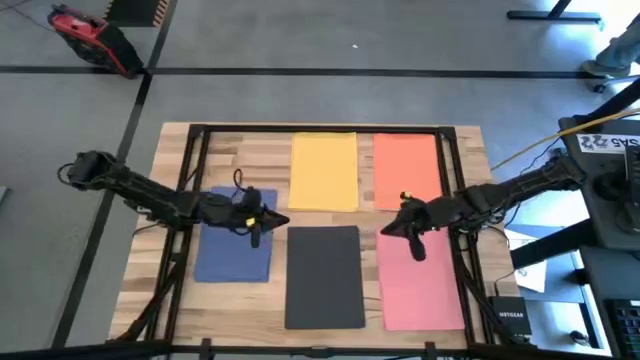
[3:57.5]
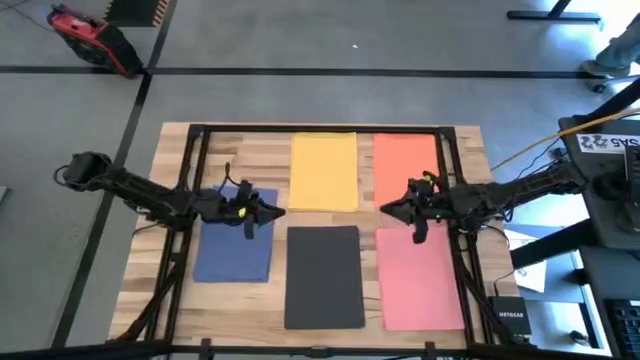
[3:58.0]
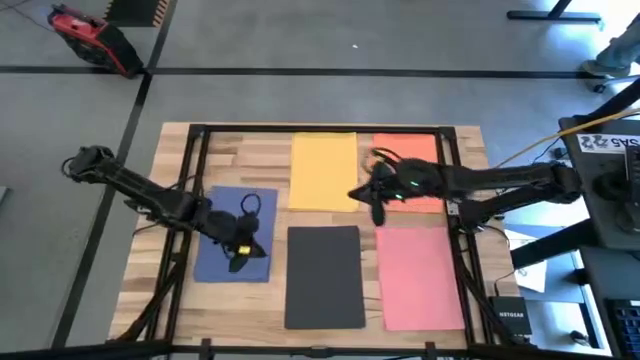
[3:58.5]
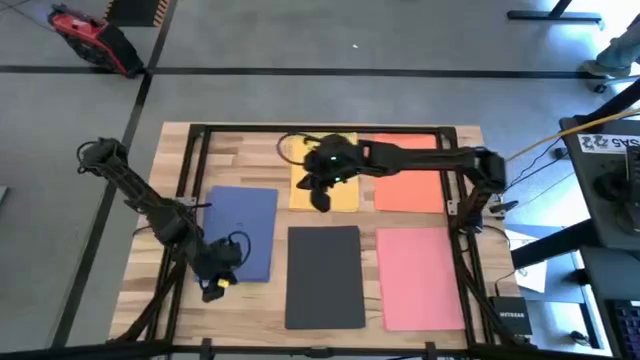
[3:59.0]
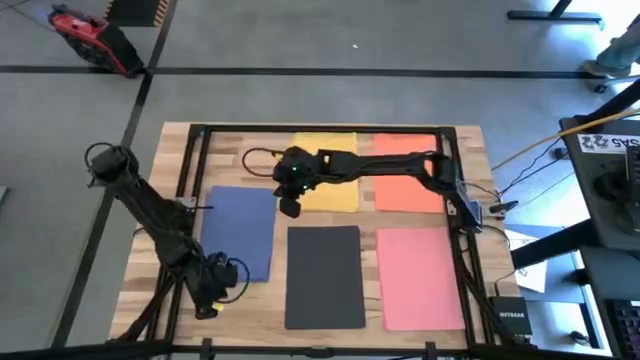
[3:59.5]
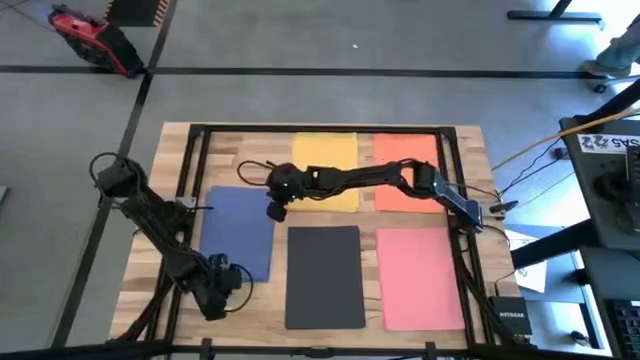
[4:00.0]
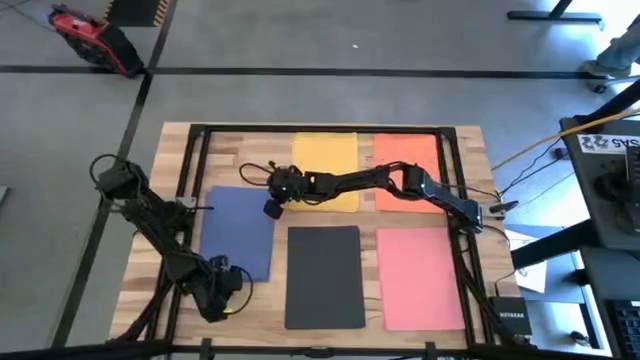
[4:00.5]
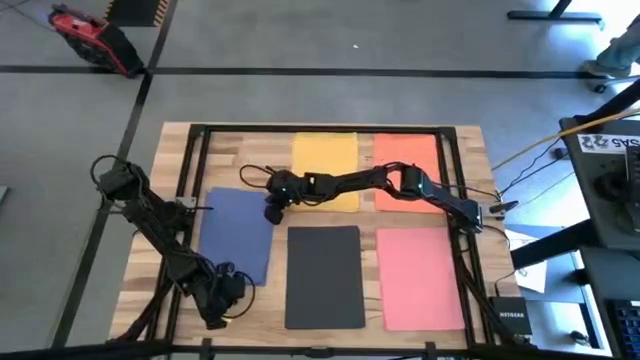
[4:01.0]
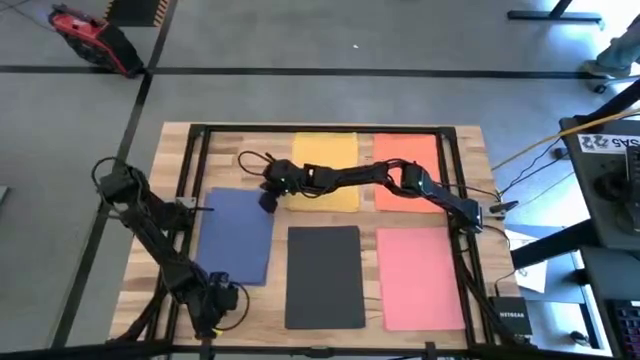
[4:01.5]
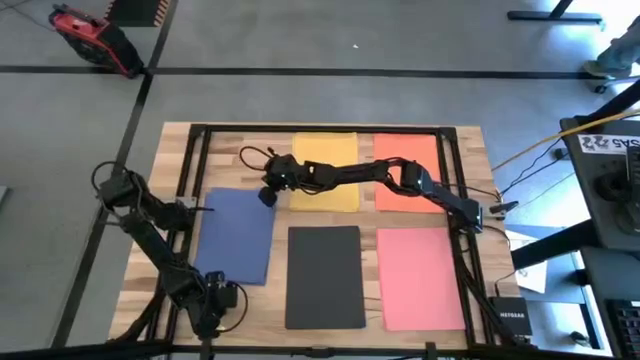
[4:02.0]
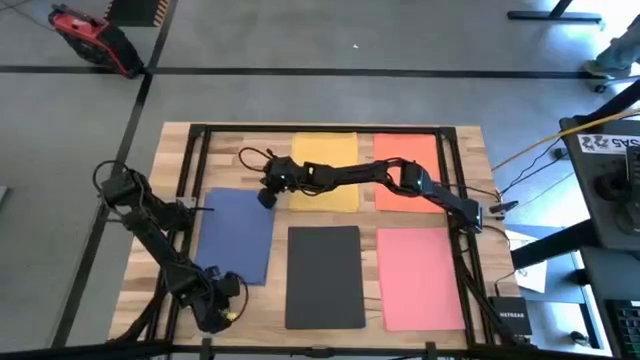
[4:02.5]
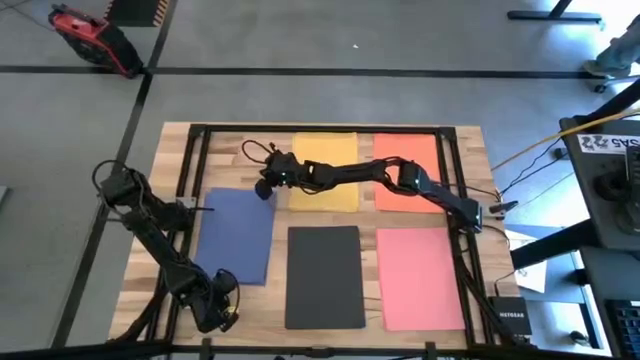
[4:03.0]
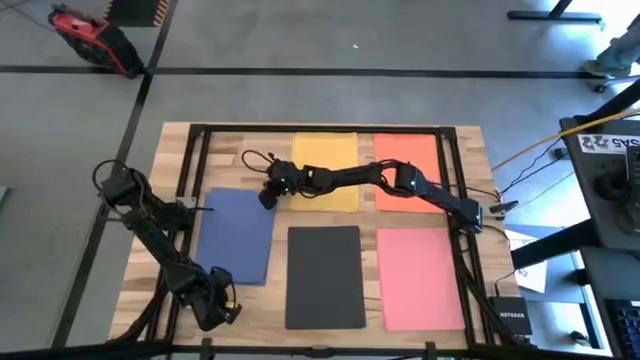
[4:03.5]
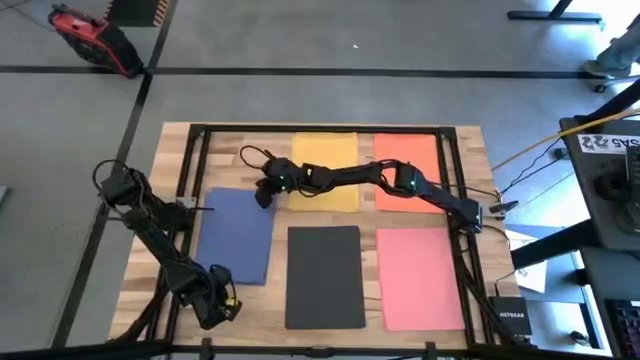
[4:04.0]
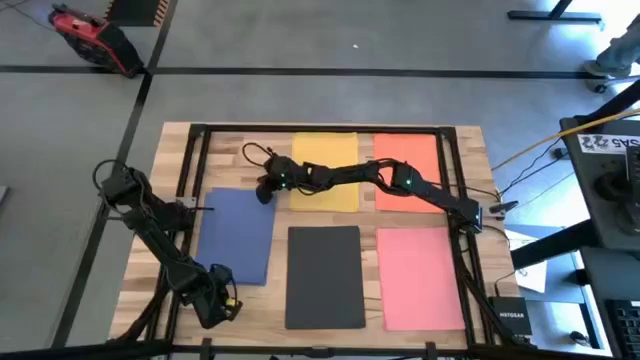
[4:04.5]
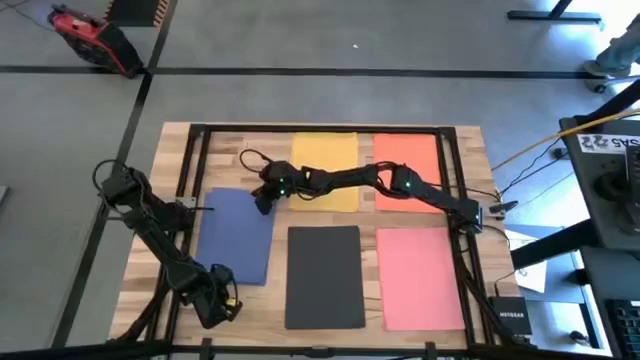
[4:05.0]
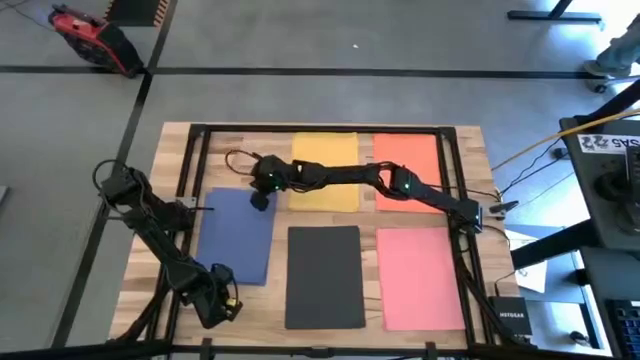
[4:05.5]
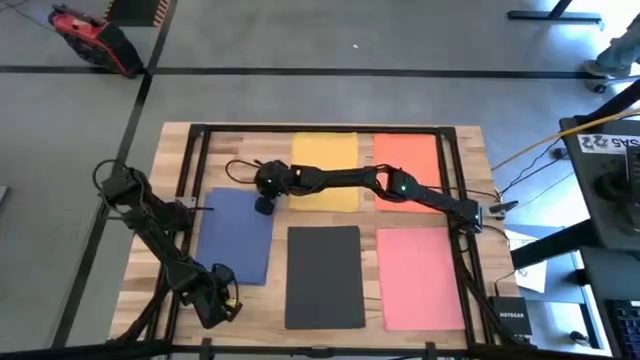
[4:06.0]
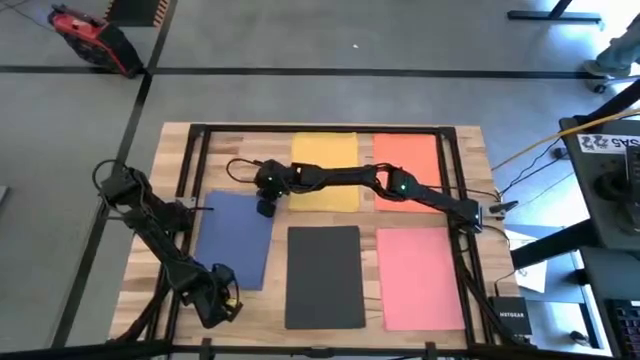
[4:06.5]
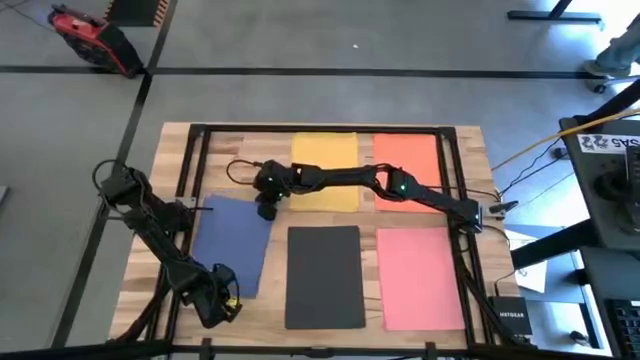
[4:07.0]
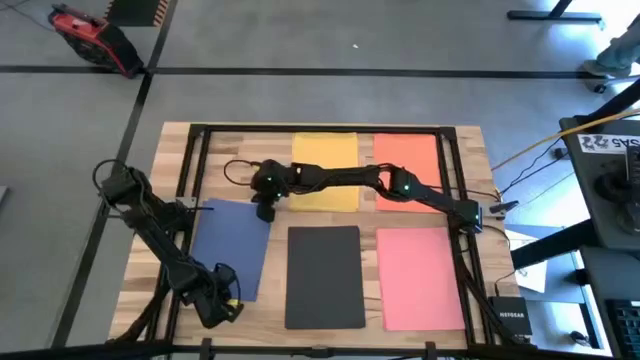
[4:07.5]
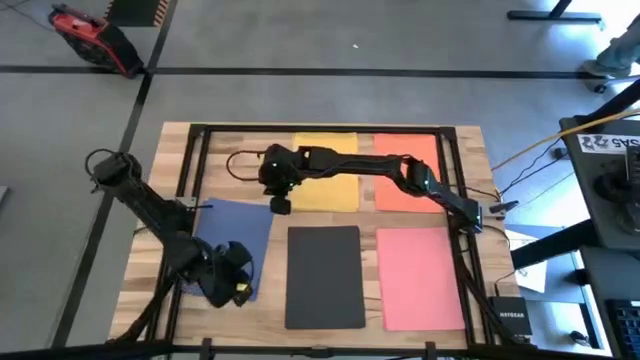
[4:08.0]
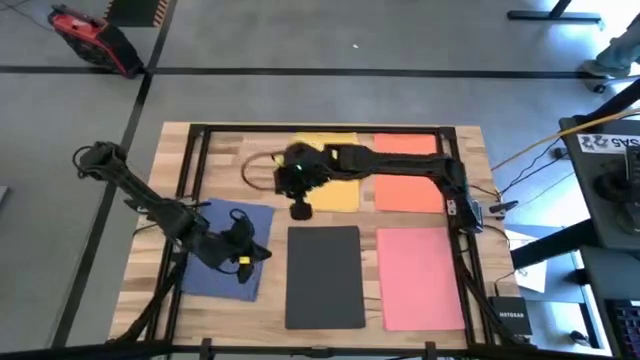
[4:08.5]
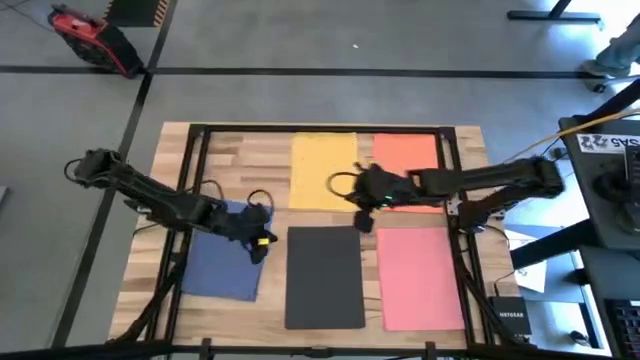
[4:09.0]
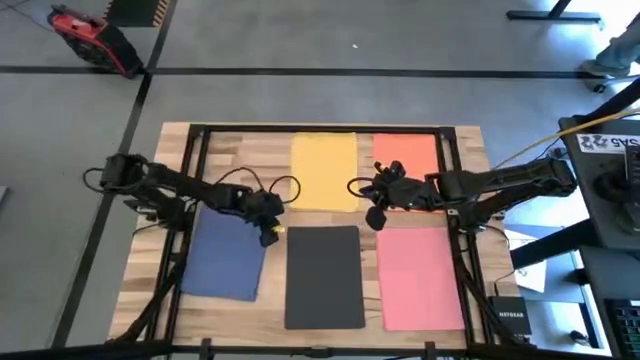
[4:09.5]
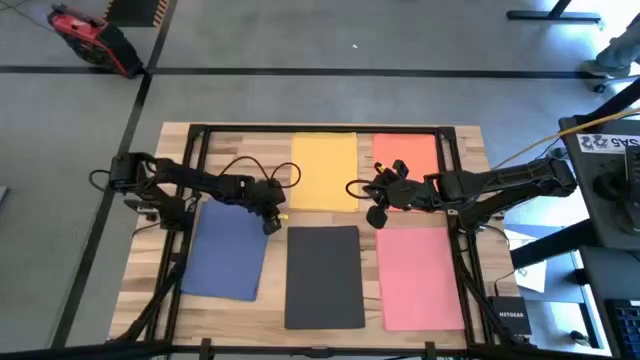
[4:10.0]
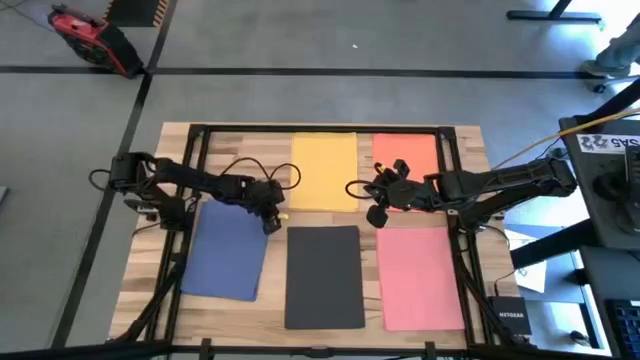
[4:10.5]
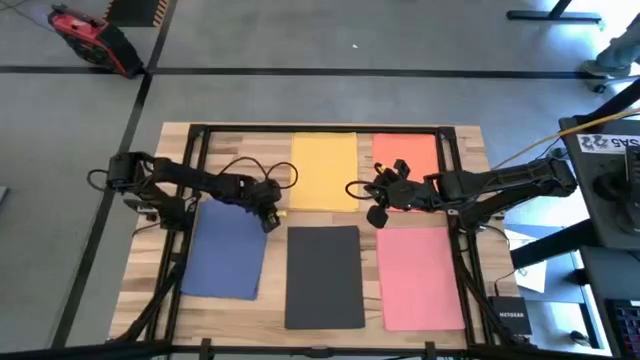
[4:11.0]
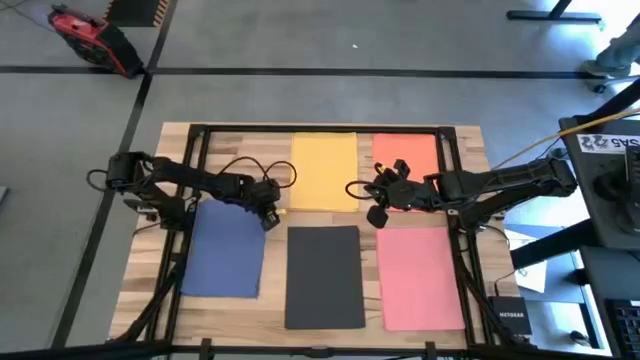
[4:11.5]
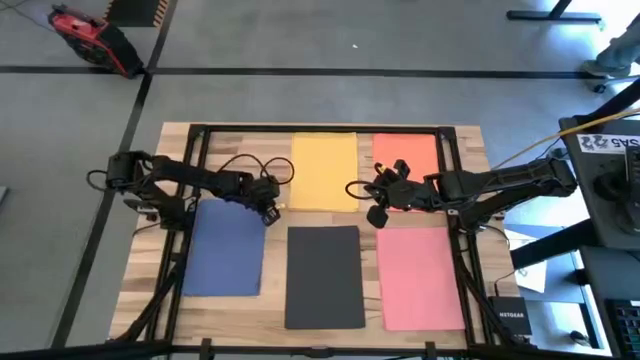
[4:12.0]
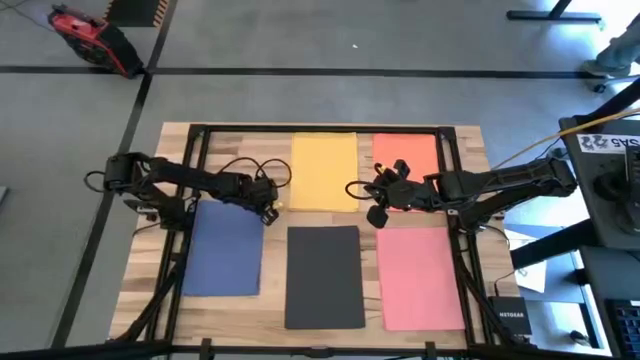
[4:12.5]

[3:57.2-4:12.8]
Task: Organize paper
Adjust the stacked blue colored papers

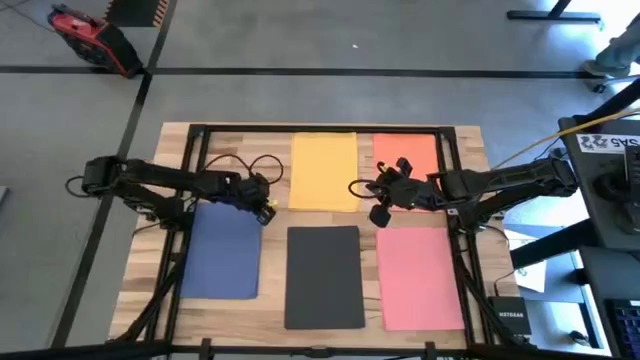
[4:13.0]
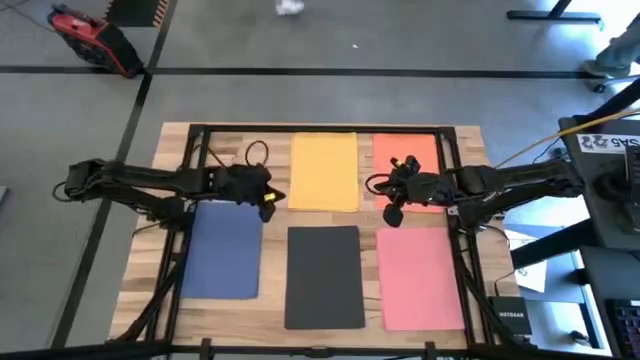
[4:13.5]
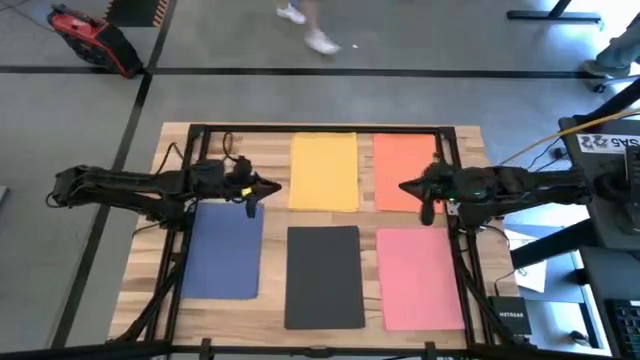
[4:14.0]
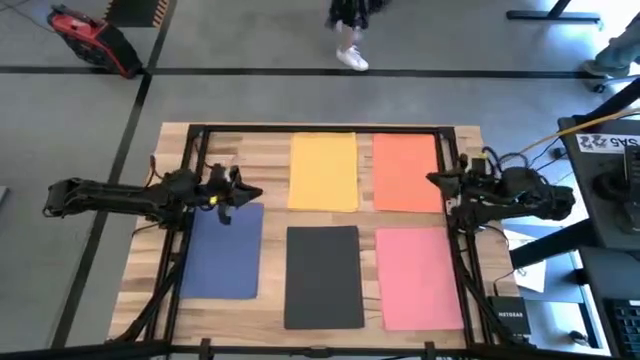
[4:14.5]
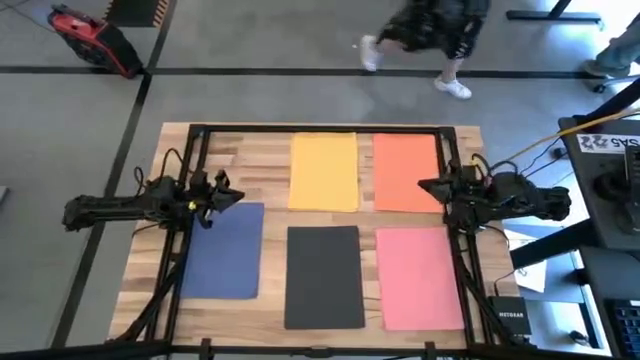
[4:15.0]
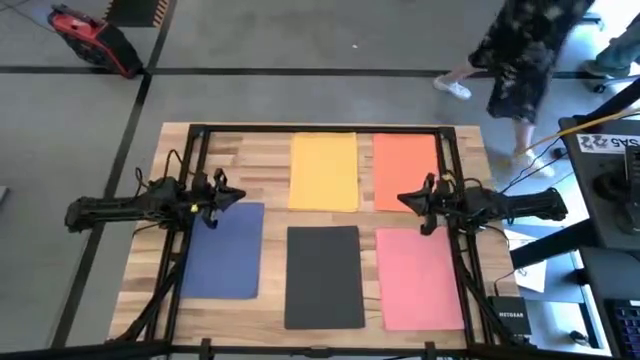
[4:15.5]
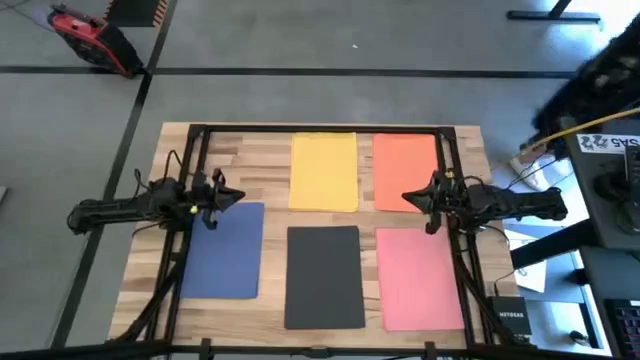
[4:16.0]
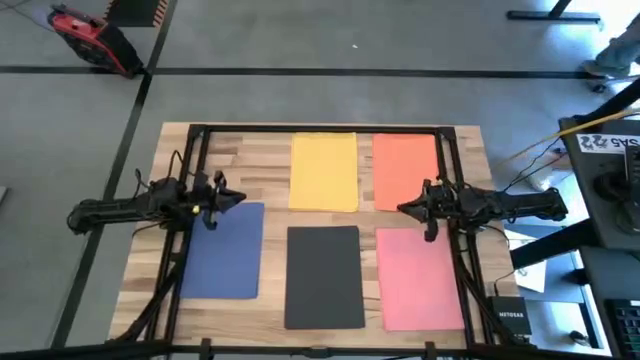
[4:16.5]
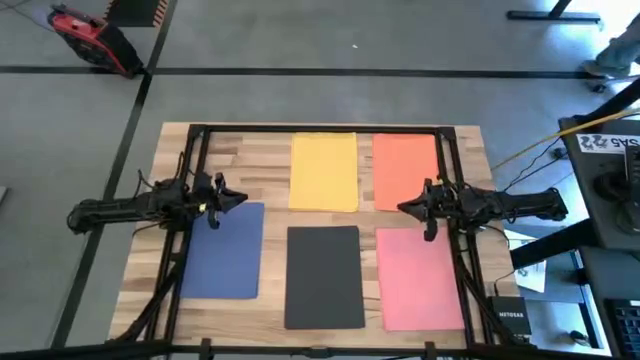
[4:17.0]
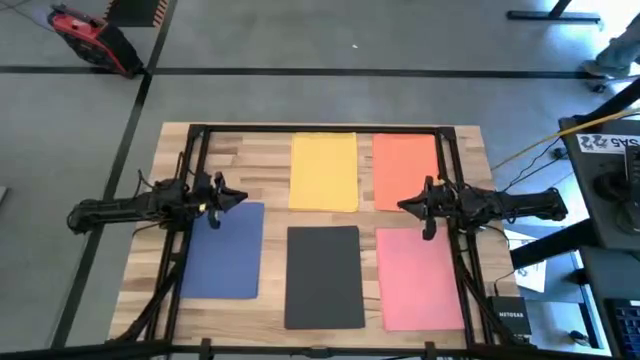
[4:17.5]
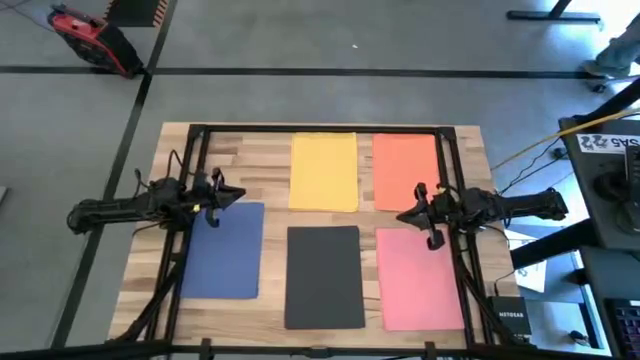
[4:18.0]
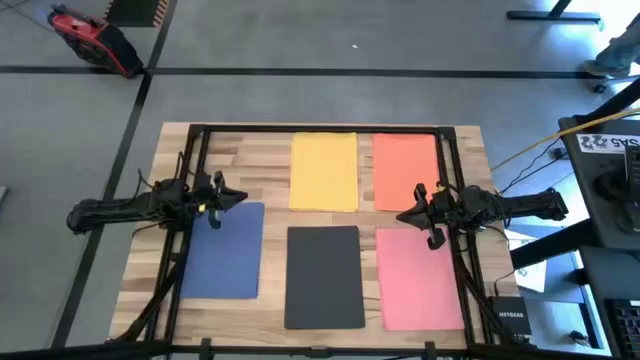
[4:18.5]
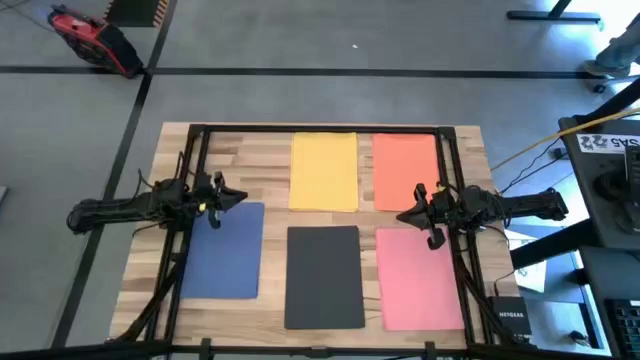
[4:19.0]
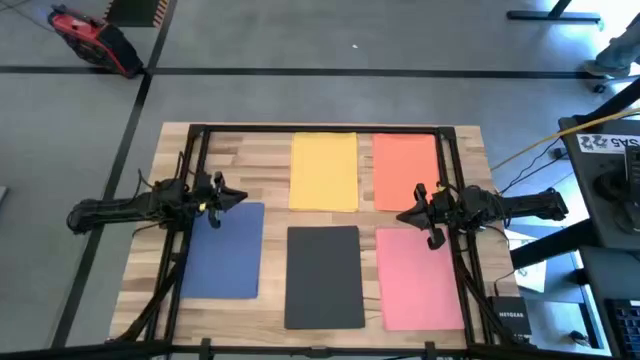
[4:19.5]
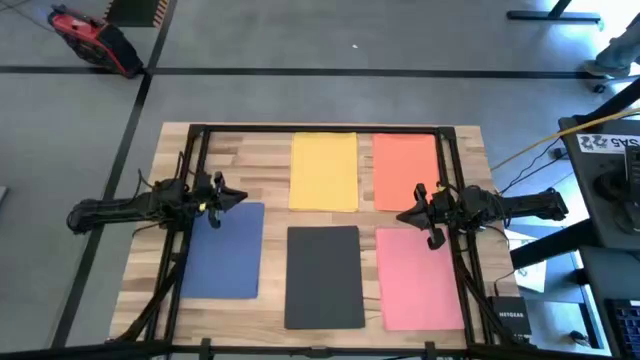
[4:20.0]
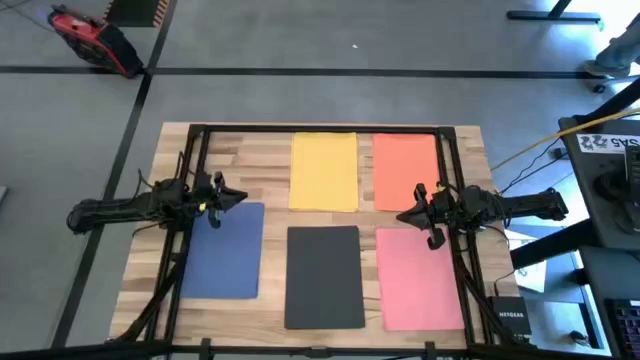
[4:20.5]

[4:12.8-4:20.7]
Return to Home Position
